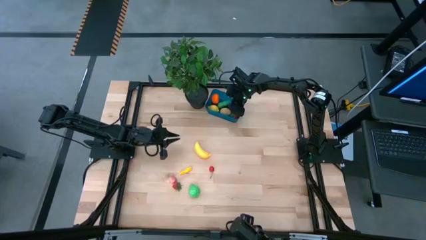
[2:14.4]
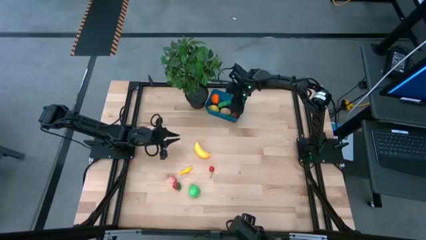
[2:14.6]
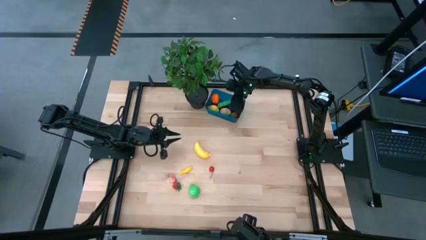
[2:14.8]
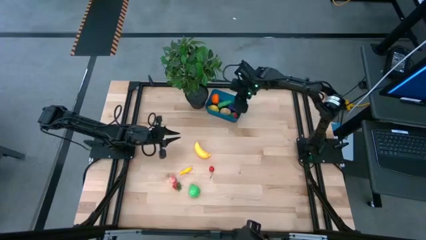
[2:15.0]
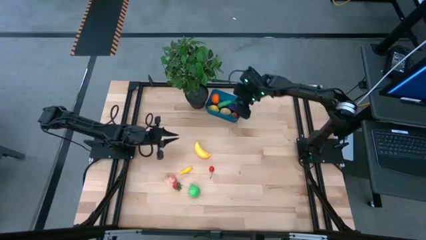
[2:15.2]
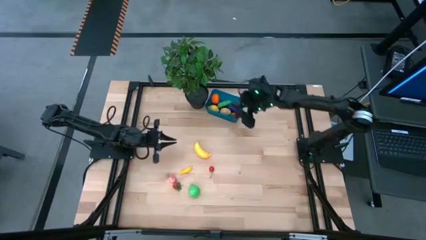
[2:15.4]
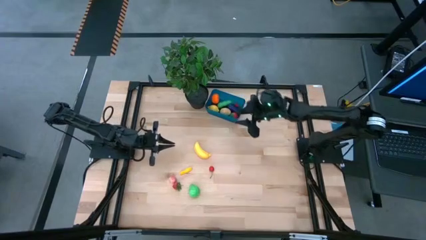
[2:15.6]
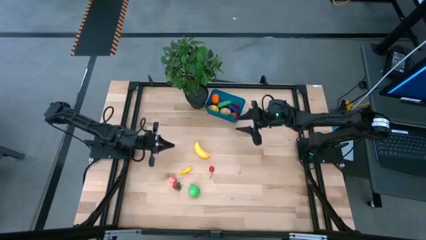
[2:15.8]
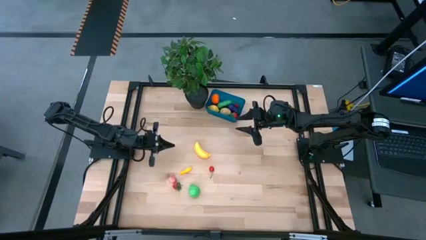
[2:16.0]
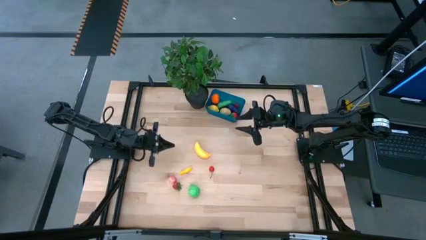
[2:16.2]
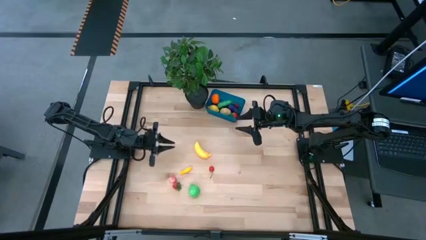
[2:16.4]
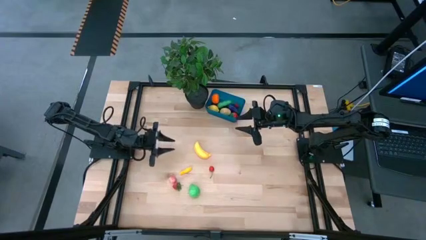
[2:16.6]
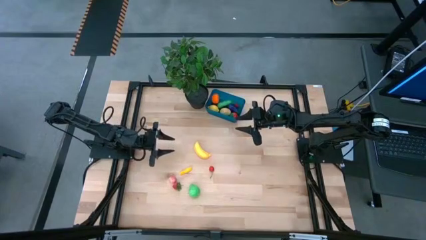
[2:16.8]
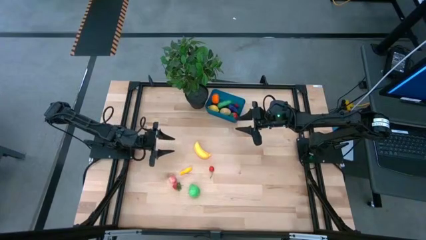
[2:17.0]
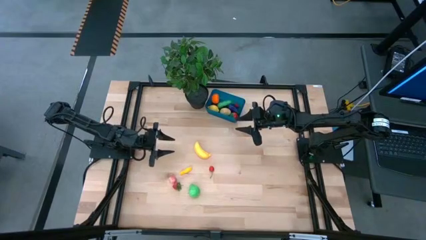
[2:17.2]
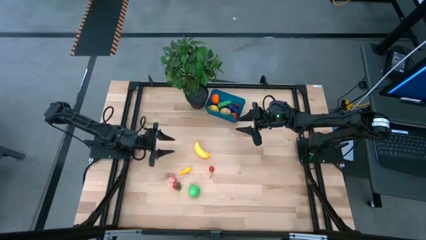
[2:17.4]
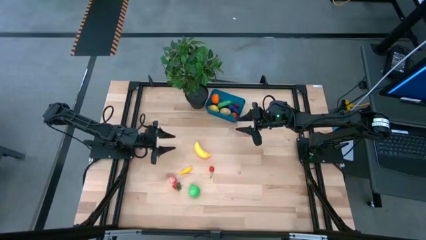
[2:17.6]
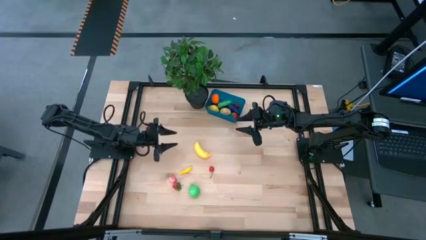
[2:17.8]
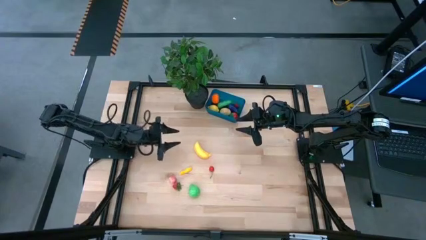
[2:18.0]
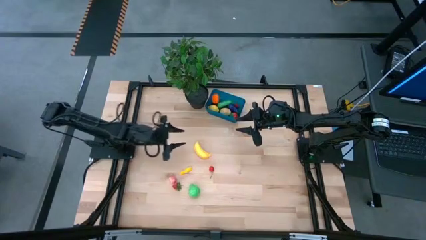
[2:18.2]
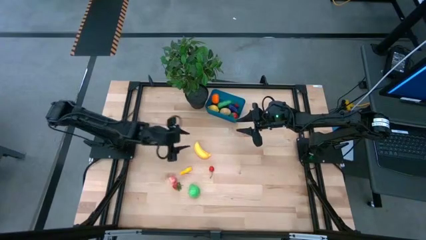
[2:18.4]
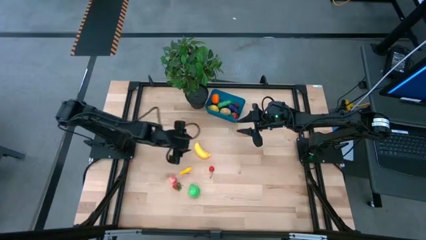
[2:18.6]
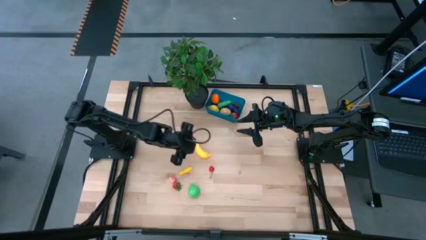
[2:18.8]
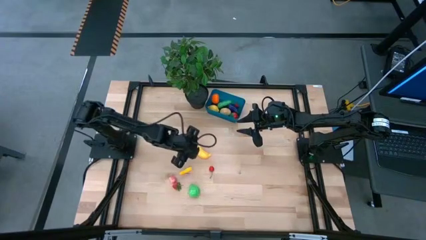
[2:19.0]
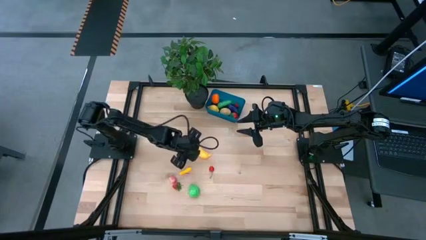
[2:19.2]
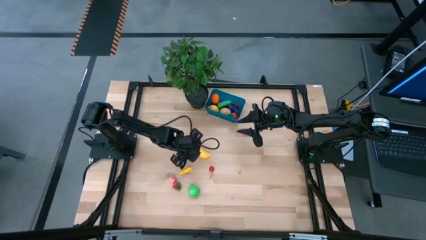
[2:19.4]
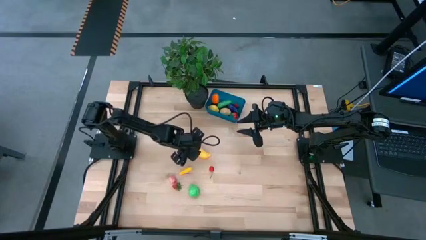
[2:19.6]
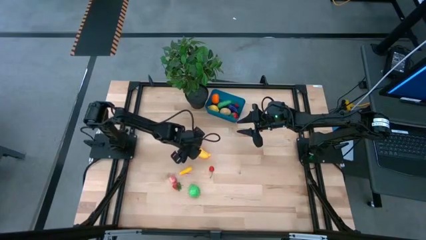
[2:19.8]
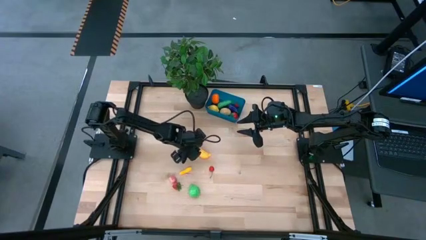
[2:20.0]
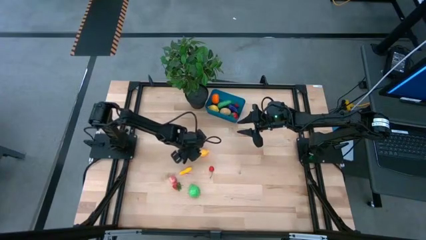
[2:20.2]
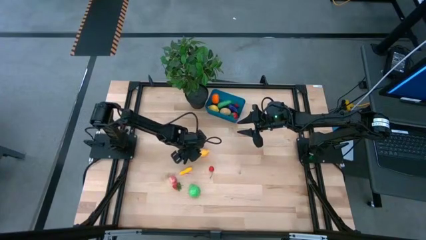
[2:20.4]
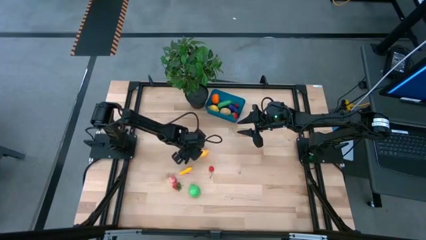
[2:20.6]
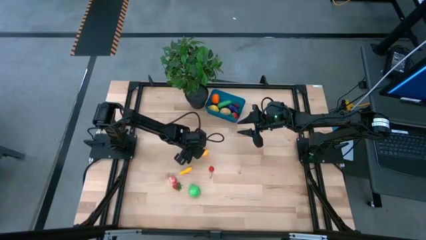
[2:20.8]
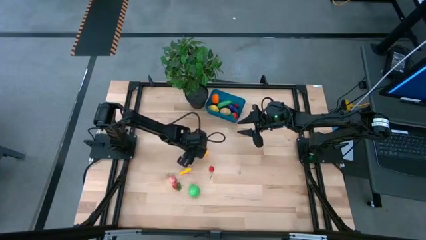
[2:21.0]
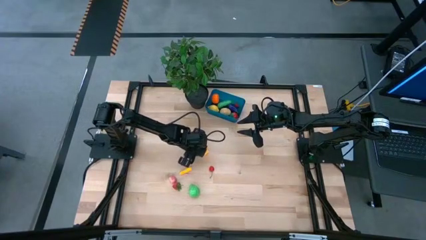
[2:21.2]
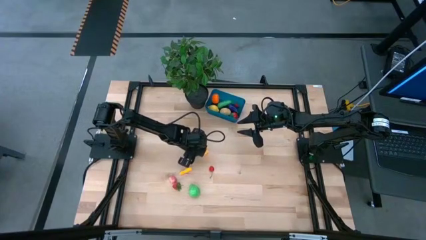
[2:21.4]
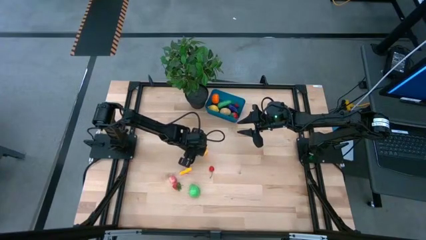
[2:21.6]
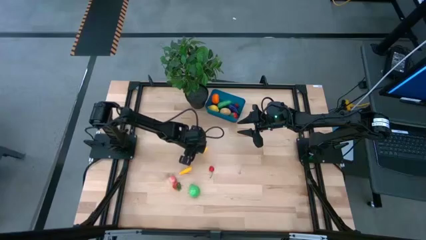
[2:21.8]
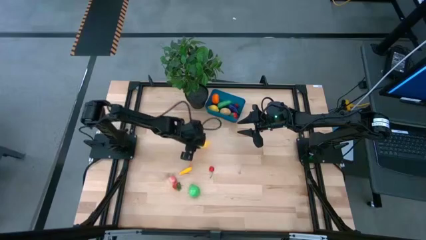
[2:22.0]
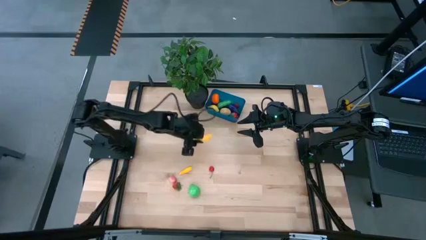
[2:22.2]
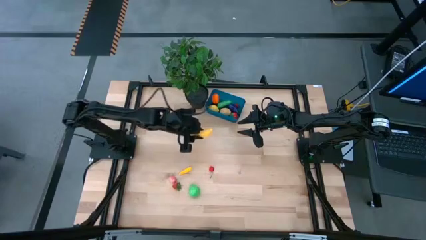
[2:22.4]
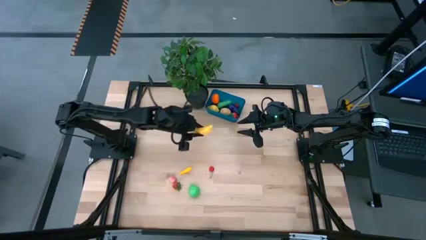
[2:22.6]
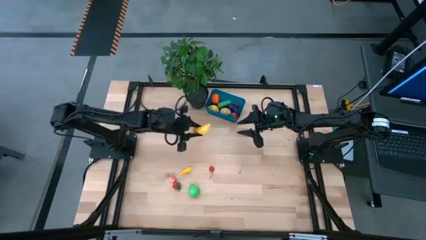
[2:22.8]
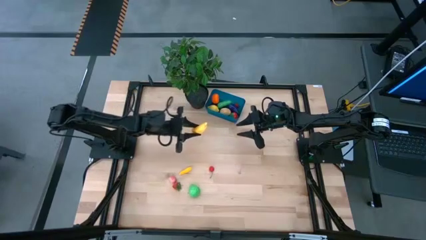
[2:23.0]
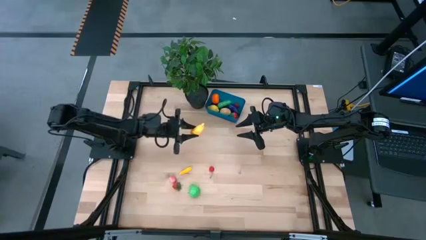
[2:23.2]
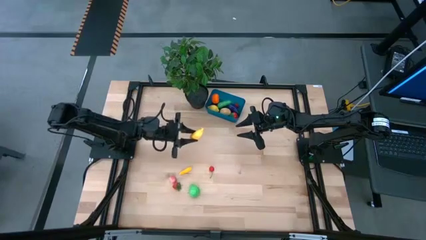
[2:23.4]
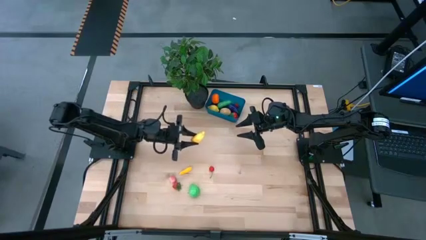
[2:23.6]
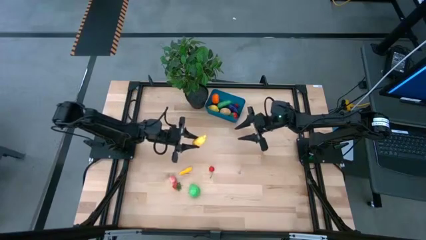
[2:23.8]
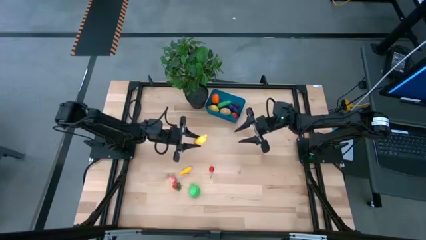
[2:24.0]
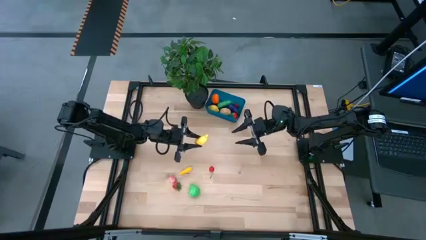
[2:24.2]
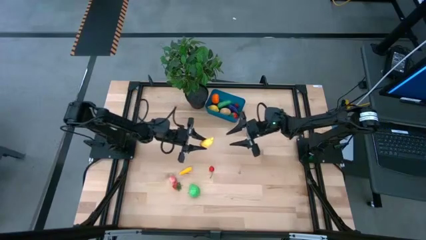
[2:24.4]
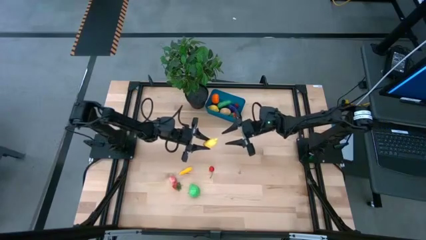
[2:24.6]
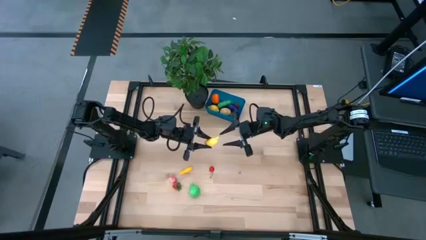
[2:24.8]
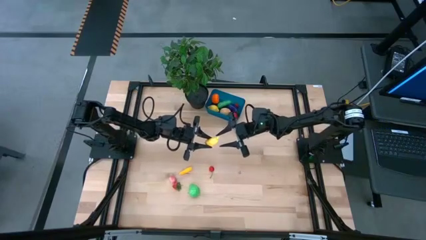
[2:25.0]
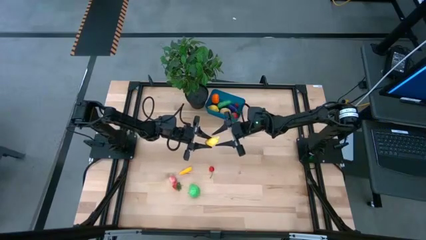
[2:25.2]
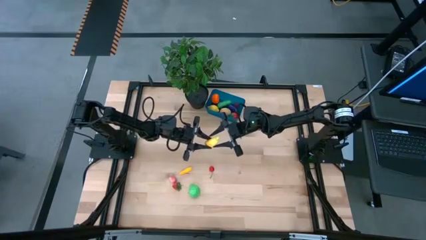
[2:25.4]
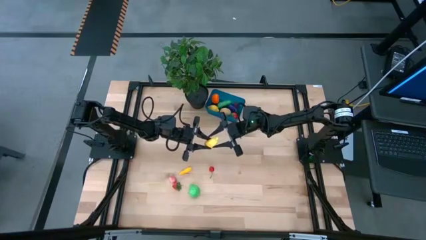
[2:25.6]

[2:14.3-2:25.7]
Task: Pick and placing Produce into tupperware
Put the yellow banana into the blue container
